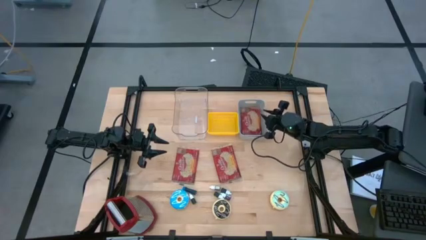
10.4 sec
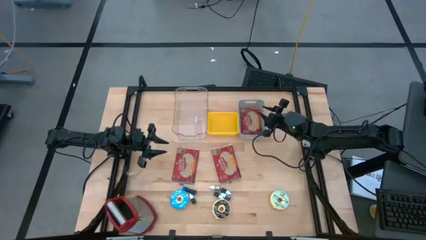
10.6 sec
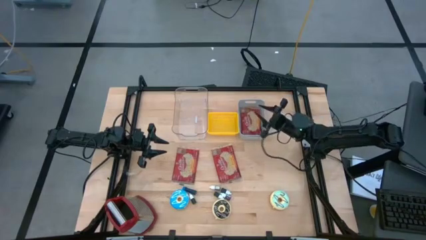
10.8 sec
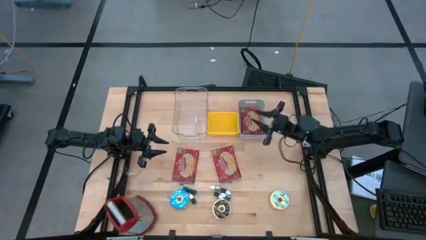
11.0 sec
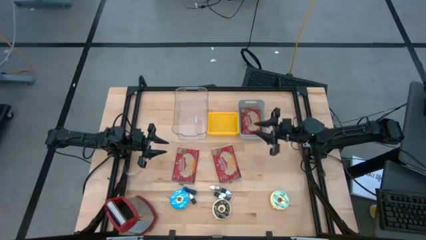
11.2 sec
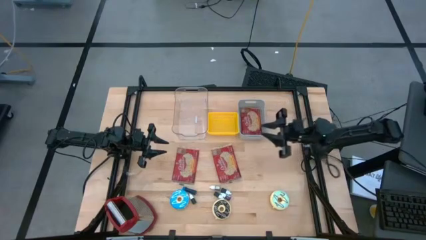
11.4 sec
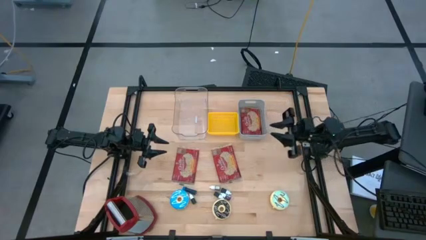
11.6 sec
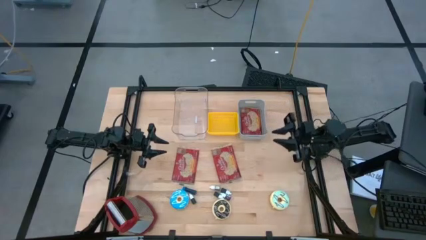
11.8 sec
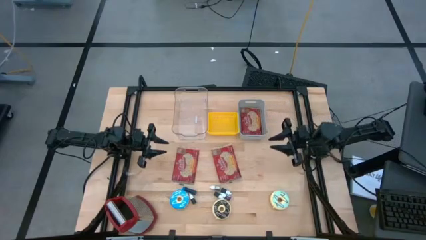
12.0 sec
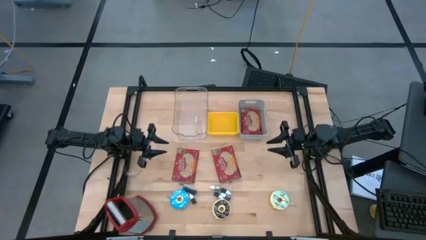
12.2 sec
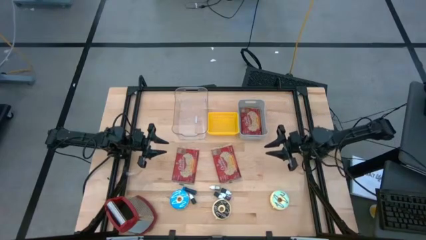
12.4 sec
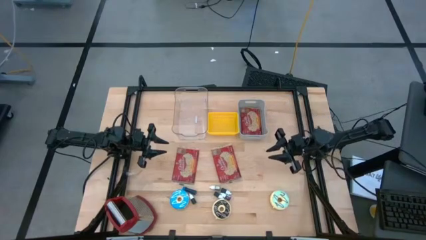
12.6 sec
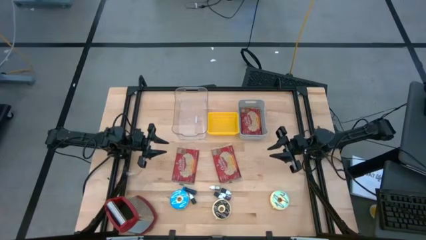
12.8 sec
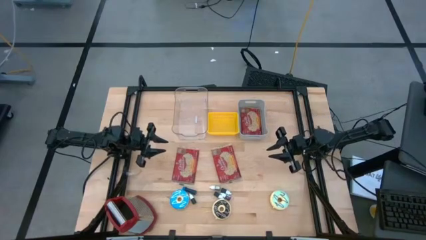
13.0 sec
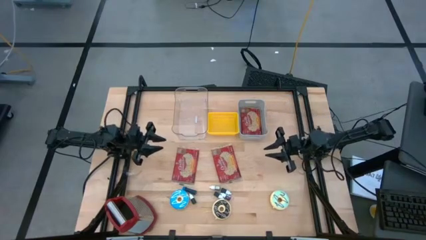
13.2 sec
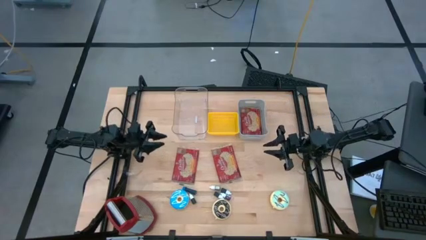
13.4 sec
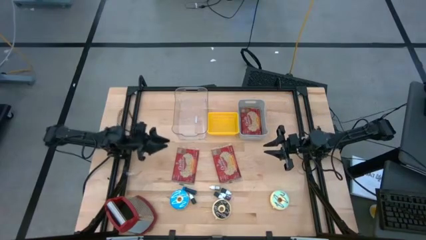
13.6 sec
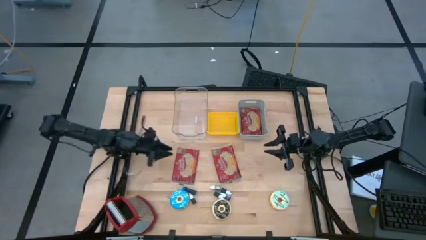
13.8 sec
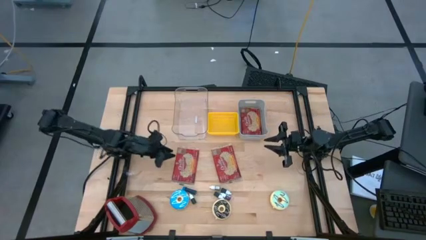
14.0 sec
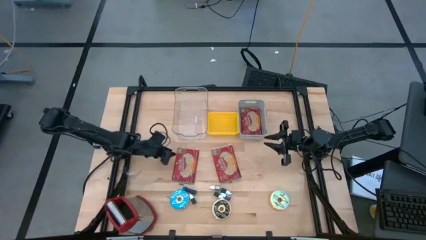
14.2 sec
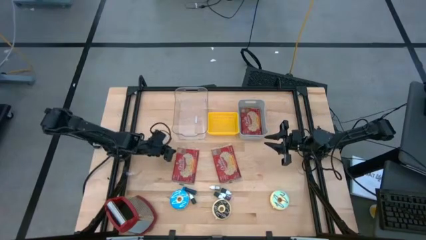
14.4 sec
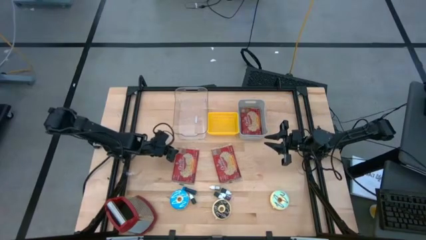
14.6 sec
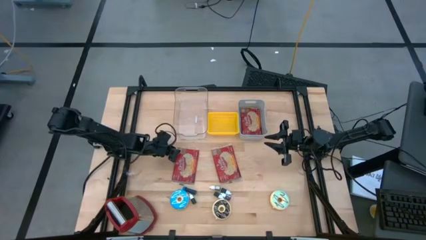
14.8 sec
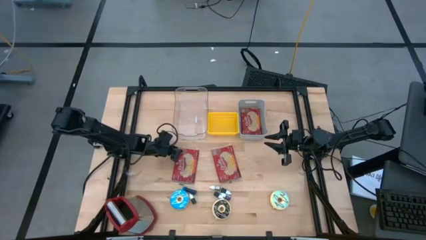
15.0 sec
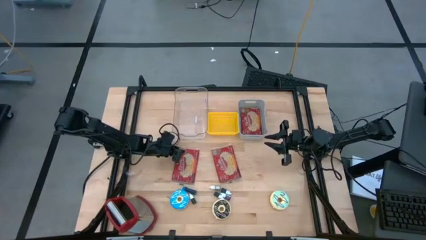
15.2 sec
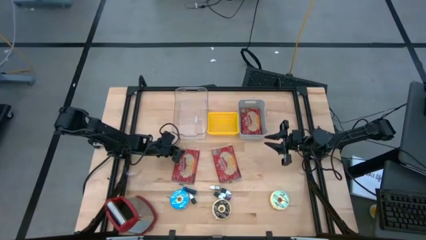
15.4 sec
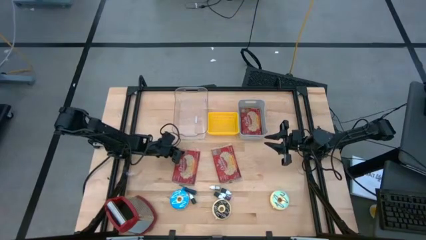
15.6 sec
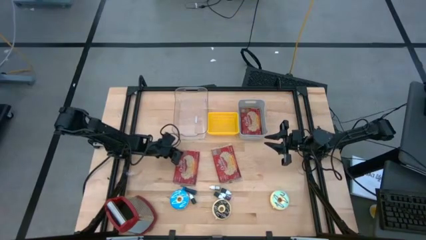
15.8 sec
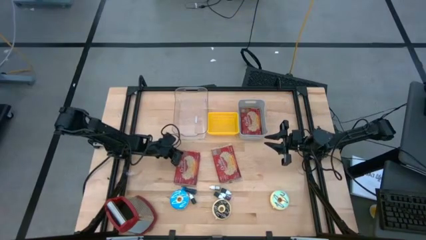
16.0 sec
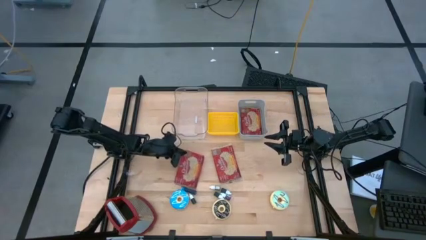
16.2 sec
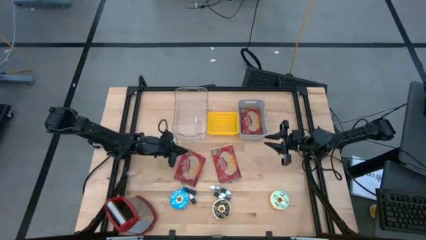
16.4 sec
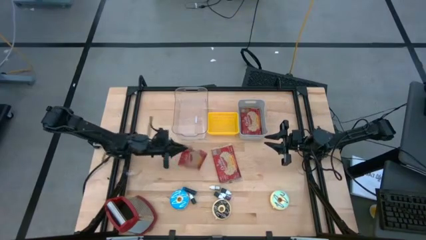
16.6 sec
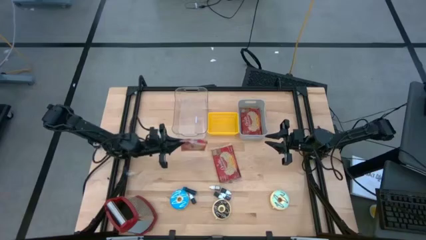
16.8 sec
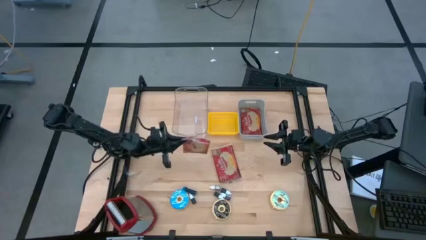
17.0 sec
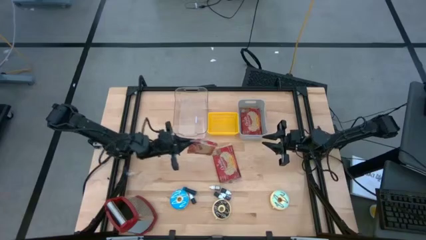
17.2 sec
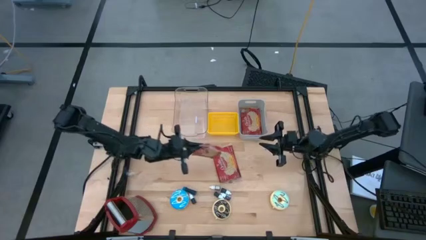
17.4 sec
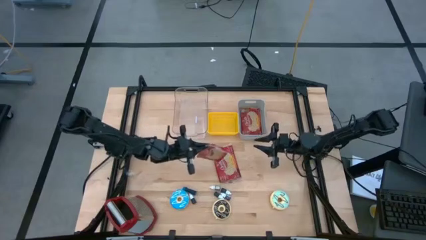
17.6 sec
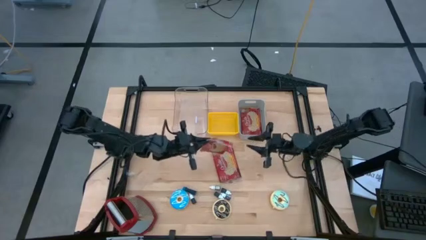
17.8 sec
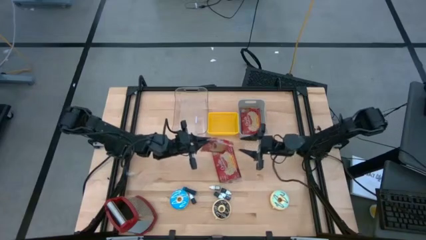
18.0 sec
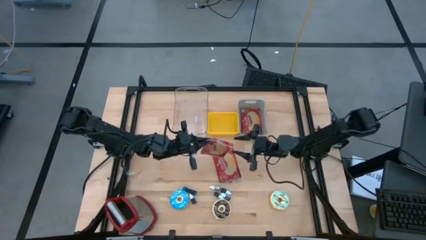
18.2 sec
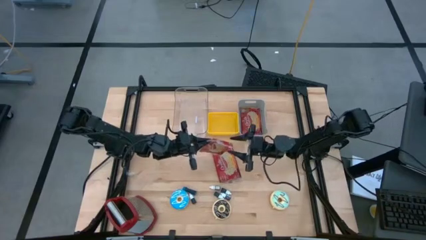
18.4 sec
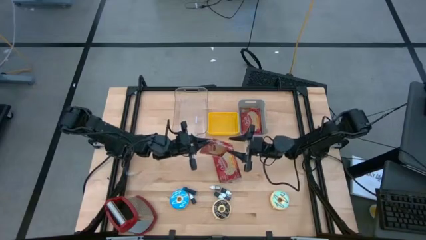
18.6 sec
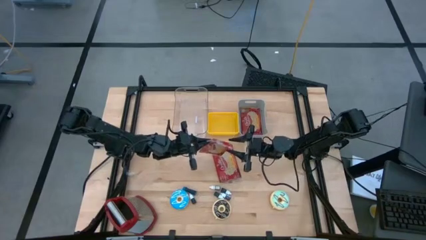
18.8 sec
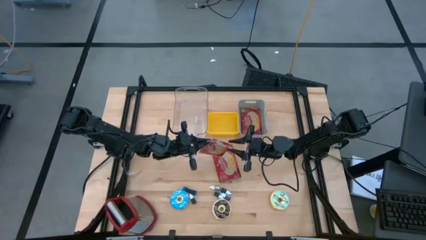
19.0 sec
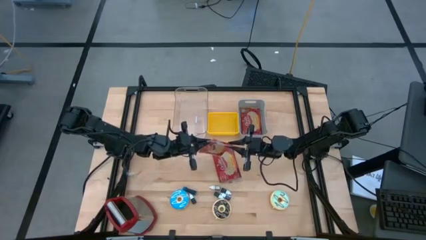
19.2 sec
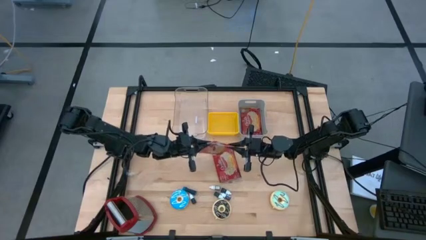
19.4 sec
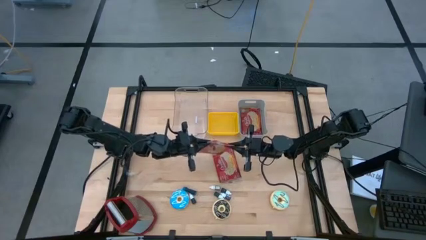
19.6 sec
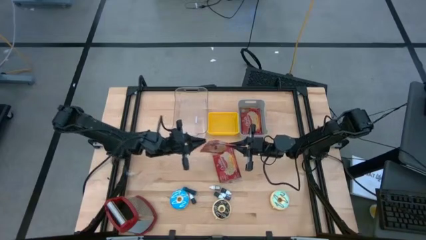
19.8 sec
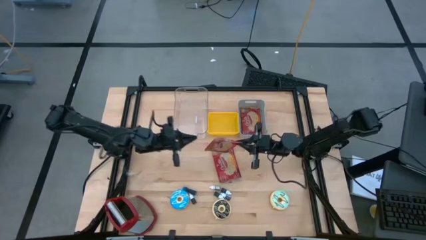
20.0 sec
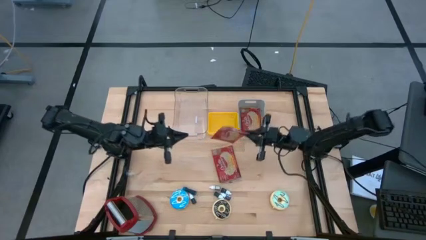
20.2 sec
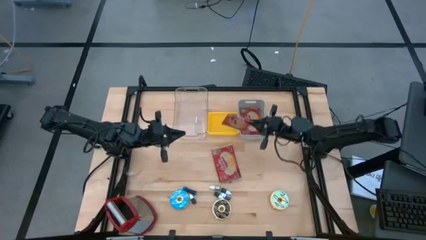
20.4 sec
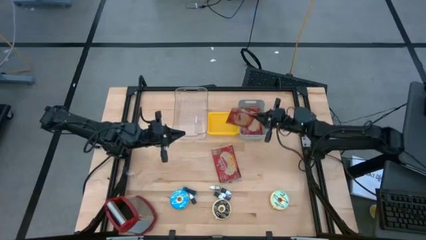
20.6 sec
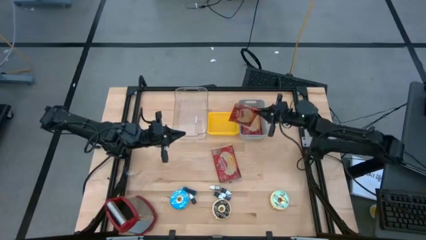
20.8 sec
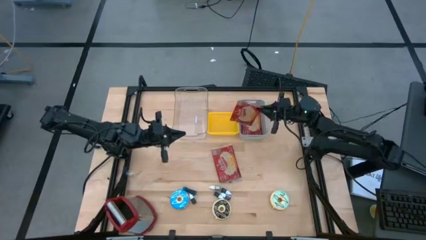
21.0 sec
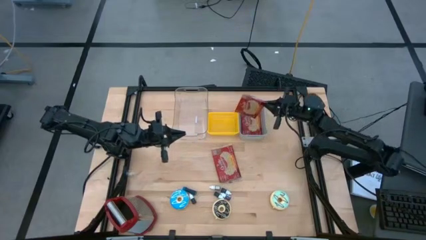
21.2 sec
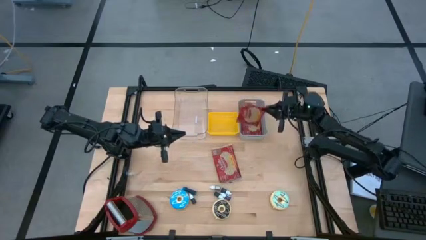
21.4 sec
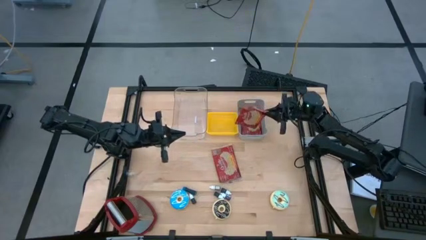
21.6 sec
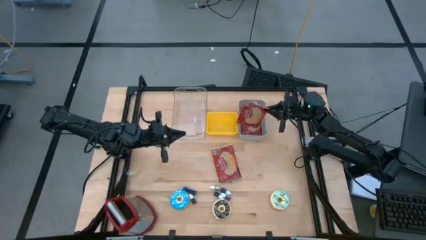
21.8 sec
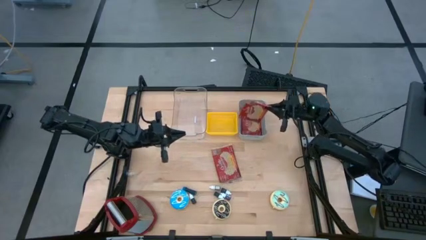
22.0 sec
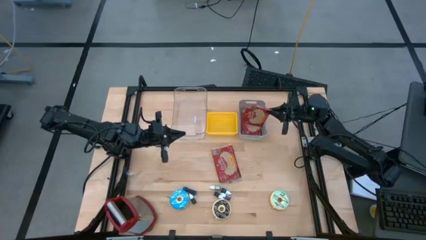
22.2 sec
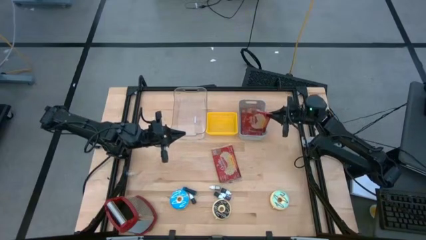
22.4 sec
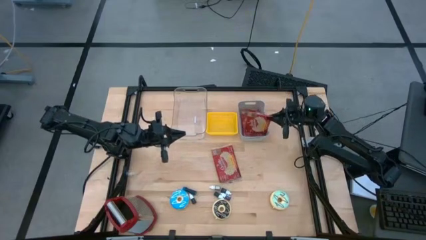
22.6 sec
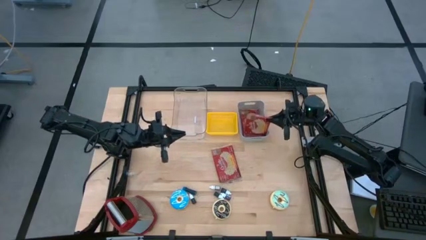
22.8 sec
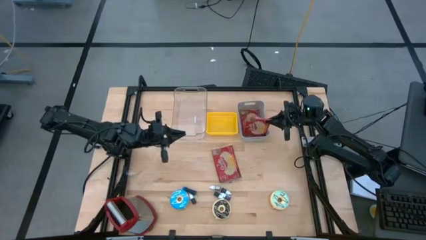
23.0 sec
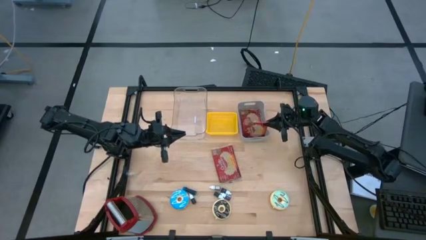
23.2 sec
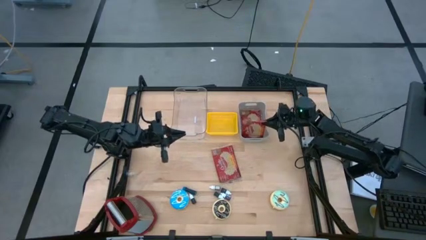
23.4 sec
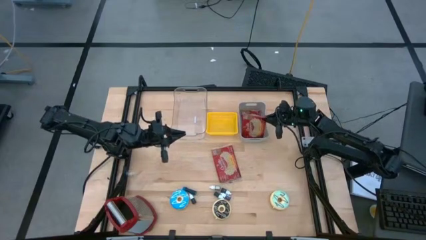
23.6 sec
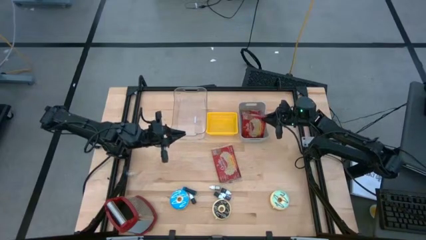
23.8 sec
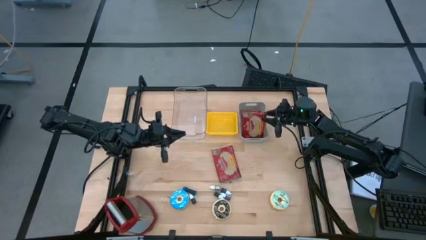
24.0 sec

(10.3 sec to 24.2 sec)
Put the left red popcorn bag into the gray bin
